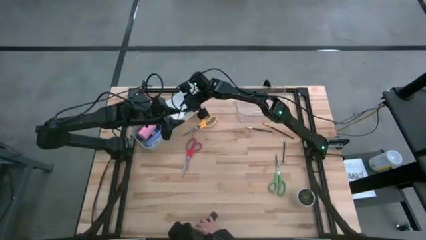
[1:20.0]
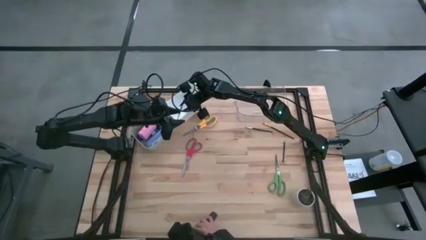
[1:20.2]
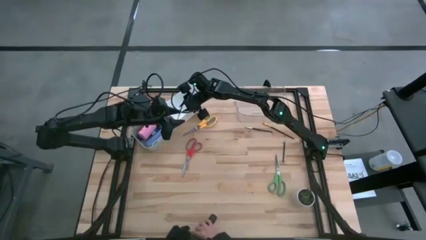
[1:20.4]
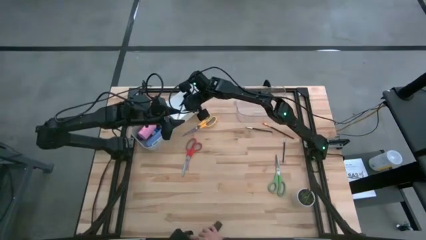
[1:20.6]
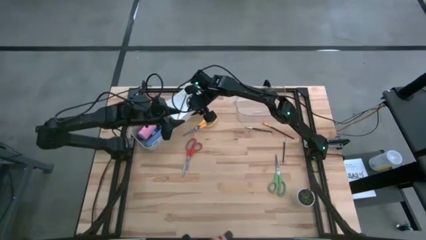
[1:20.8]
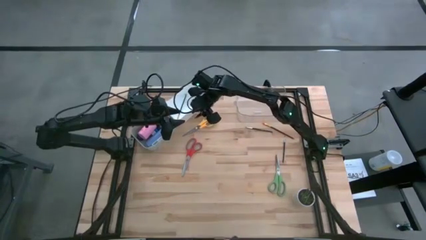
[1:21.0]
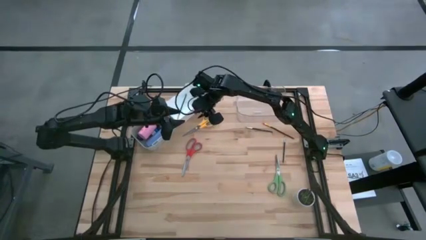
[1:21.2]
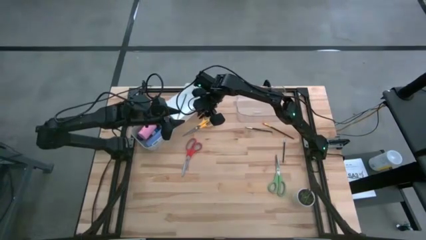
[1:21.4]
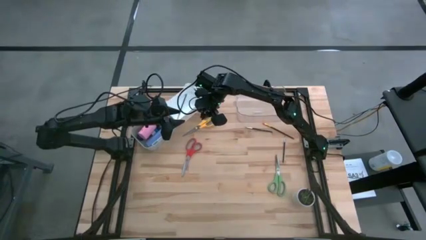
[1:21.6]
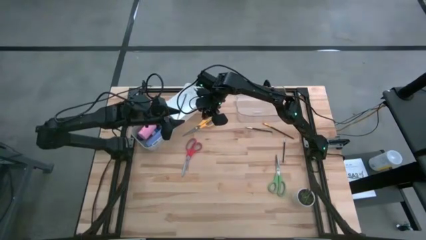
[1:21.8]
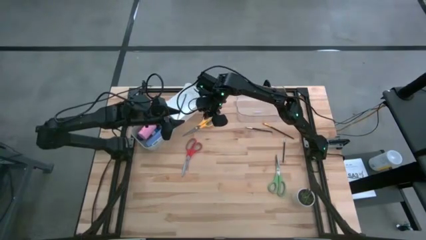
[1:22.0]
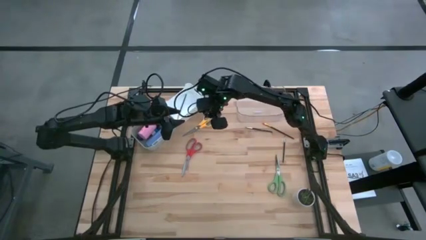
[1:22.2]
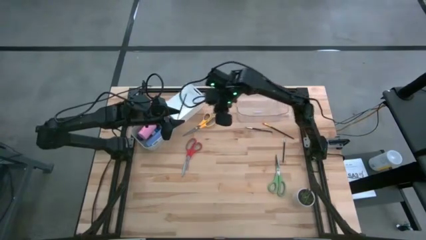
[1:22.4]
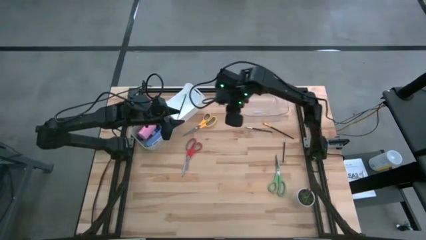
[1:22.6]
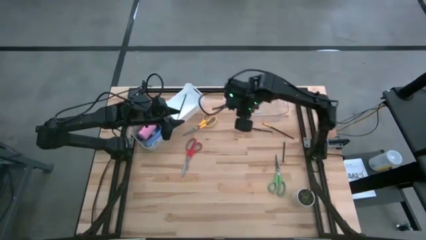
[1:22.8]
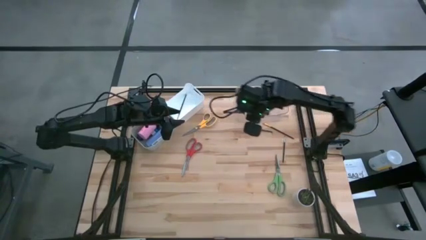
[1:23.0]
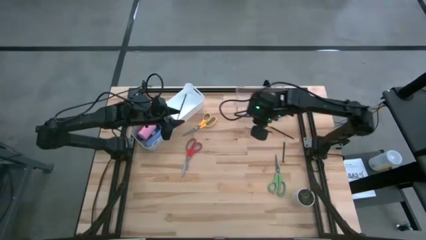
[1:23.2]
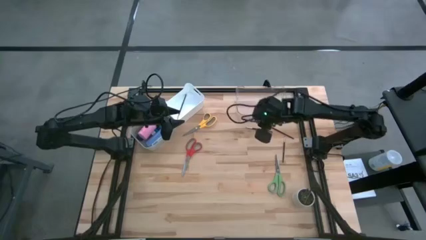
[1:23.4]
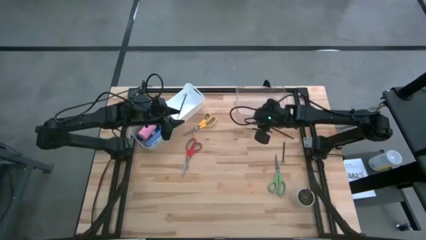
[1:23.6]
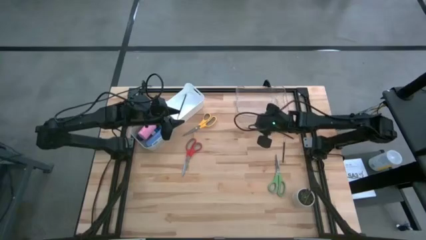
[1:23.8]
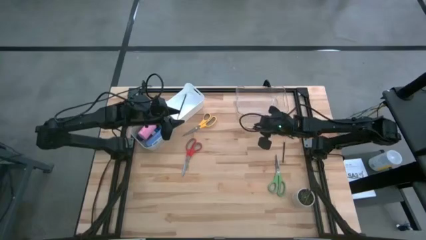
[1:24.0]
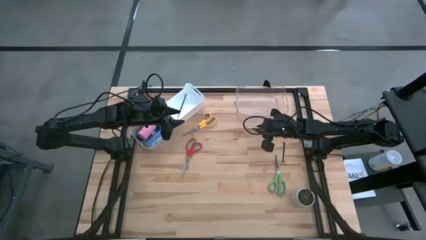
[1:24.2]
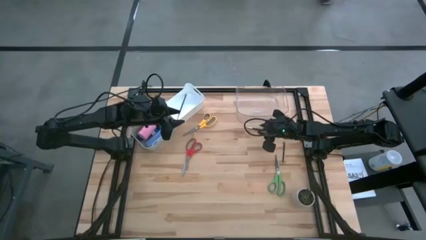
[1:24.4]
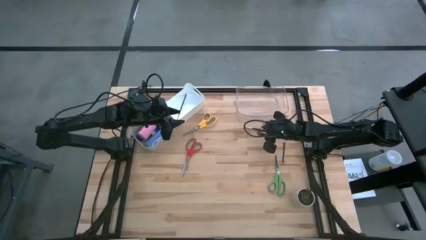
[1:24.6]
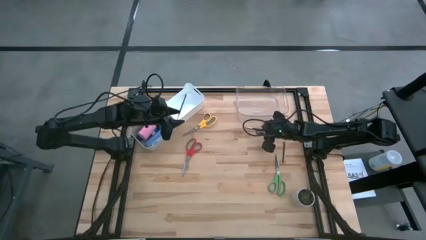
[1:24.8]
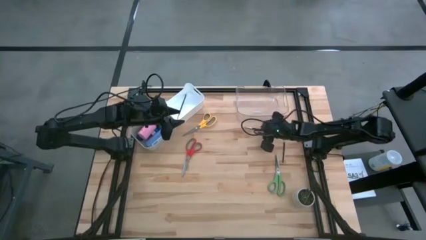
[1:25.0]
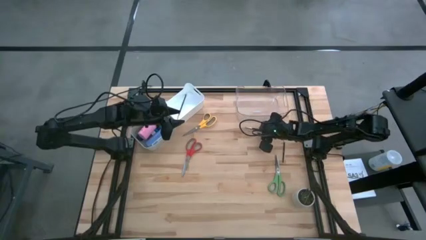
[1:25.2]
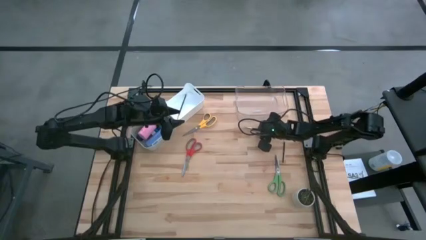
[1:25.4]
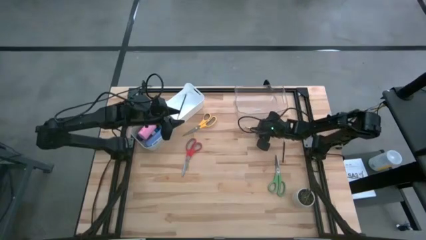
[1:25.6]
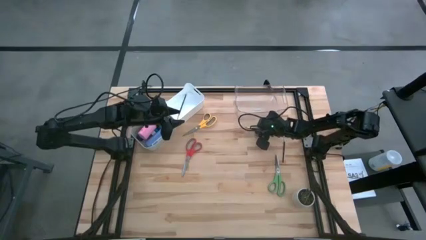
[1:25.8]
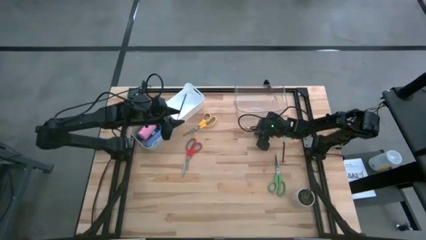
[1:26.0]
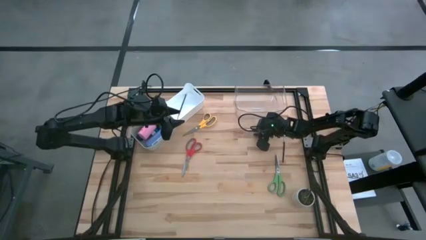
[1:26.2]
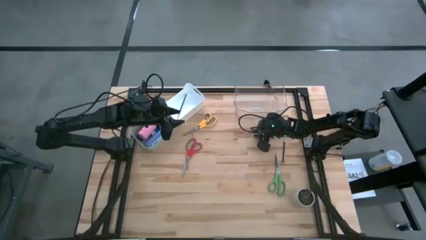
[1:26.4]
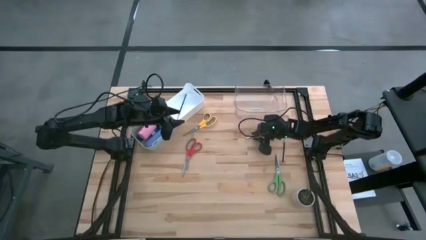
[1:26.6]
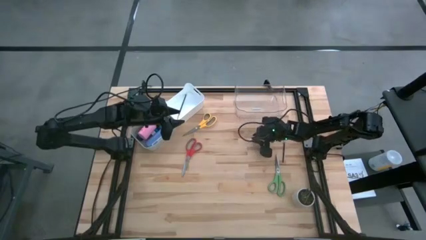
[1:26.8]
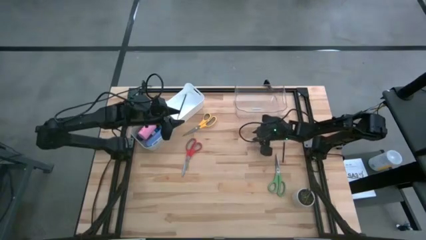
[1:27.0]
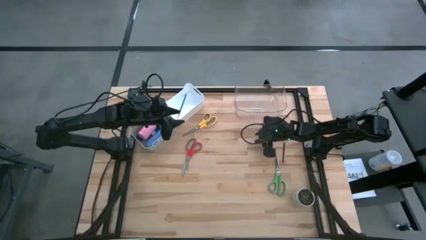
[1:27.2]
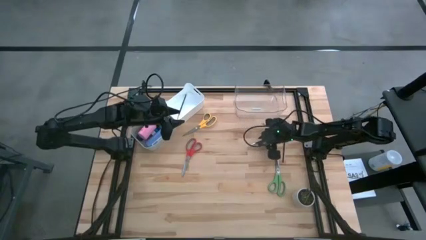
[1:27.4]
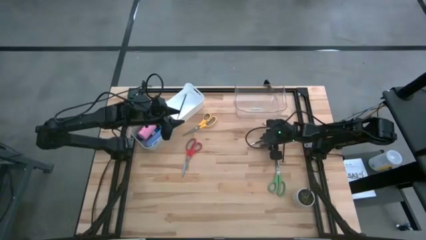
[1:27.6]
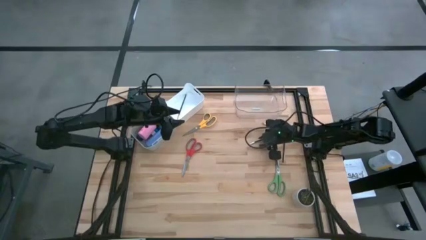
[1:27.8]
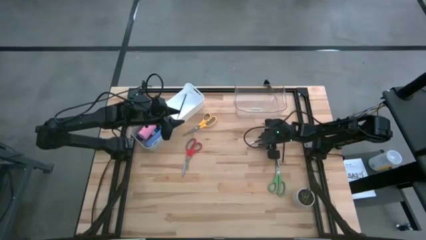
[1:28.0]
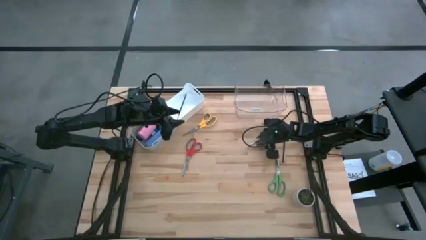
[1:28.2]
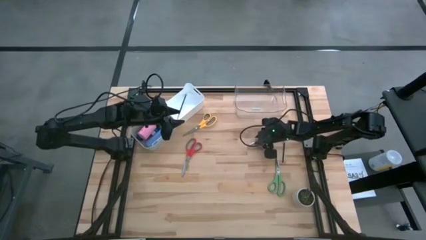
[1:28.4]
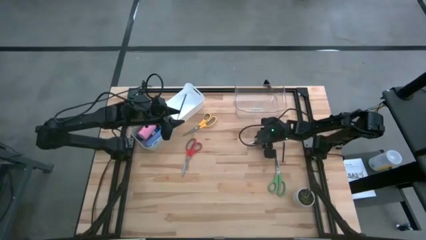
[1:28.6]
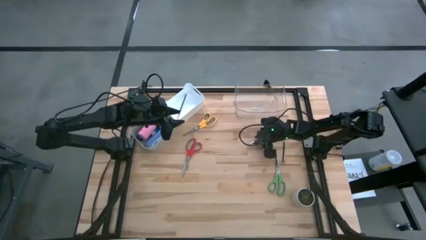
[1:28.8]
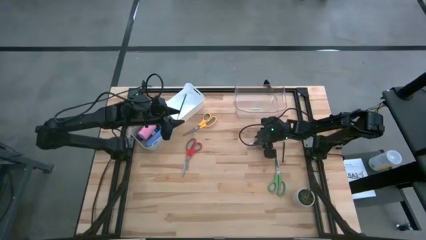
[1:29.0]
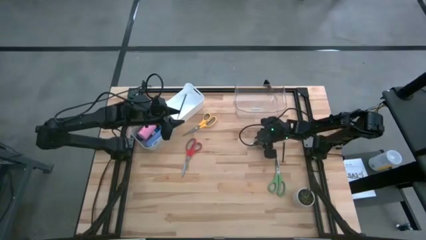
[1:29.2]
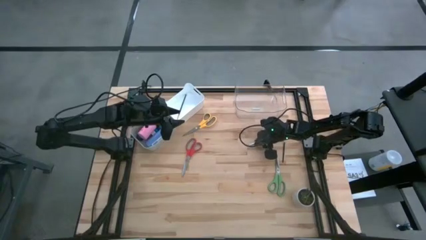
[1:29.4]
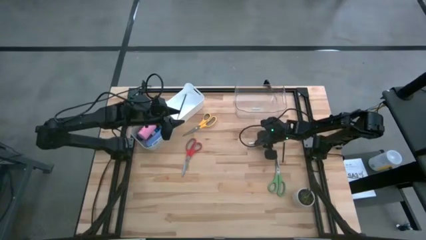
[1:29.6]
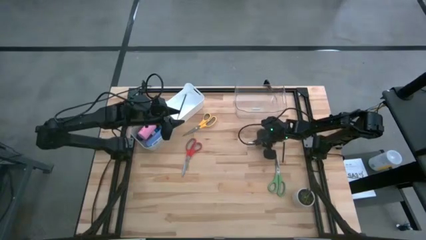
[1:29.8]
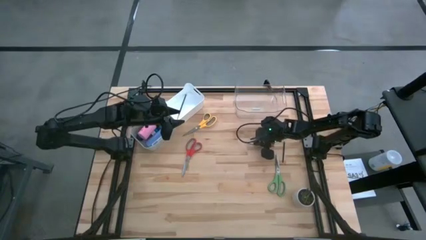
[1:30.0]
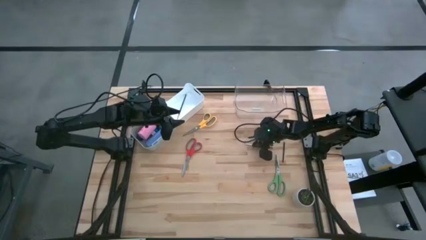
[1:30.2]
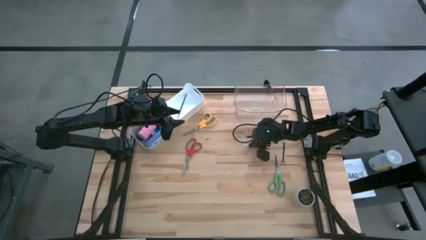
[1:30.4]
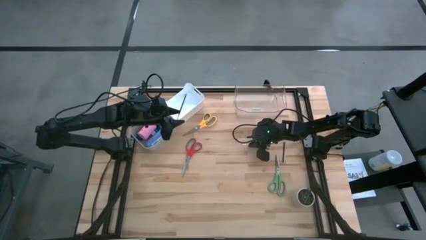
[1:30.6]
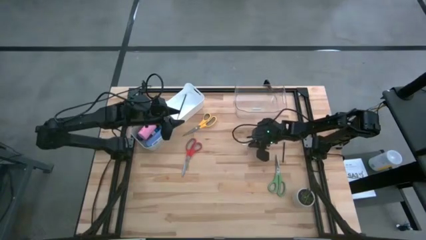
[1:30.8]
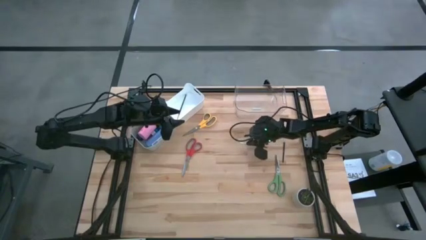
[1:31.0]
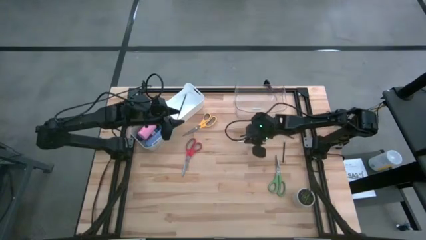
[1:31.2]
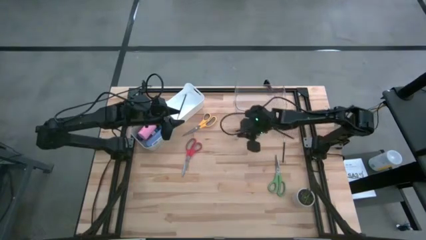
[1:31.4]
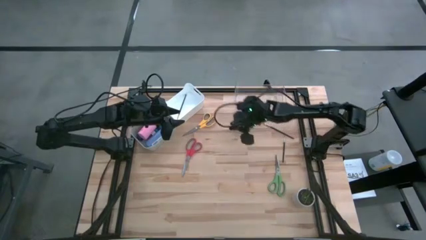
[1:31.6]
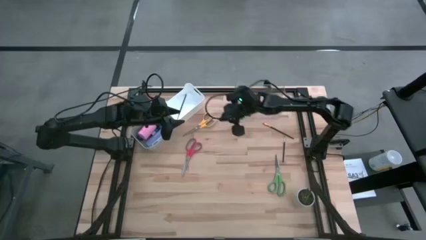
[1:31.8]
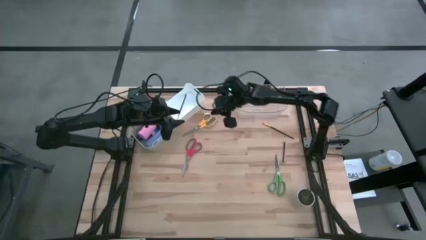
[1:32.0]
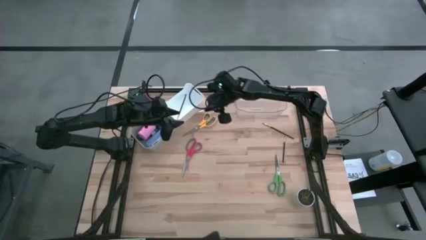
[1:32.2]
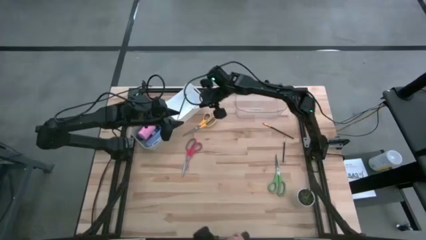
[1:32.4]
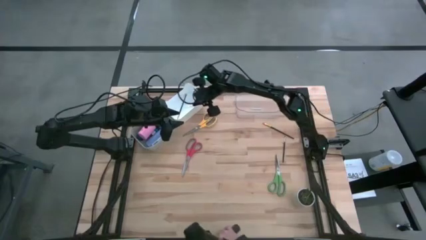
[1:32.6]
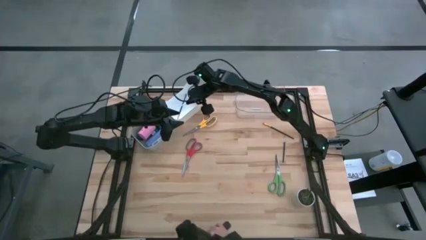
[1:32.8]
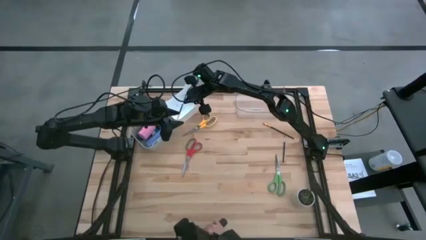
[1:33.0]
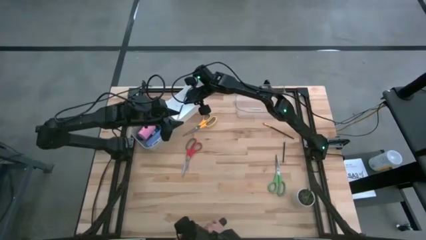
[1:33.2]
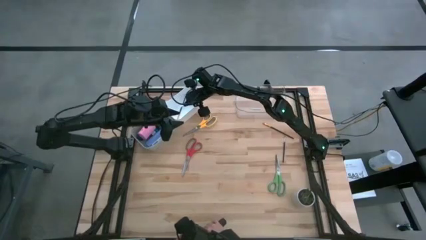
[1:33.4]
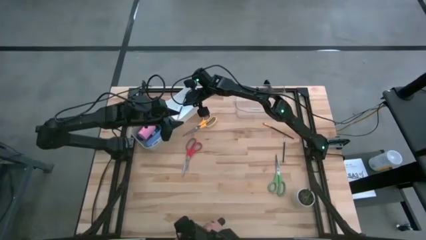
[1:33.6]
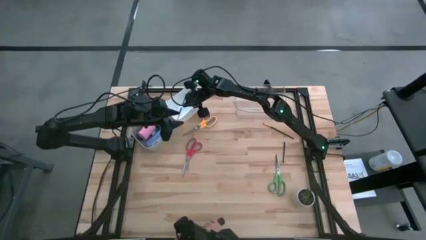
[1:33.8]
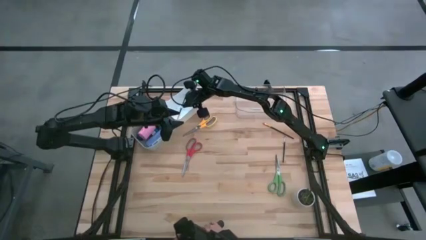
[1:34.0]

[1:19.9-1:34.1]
Task: Pick & Place Paint Supplies
Put the top silver paint brush into the white bin
